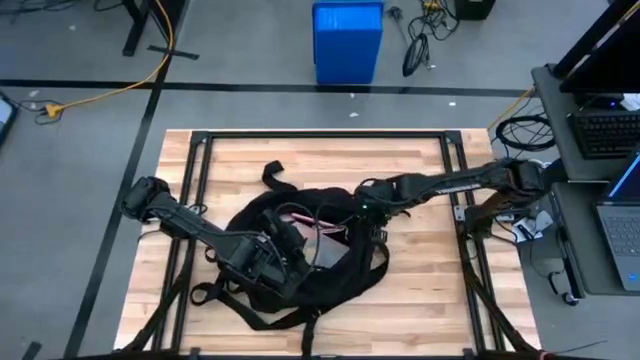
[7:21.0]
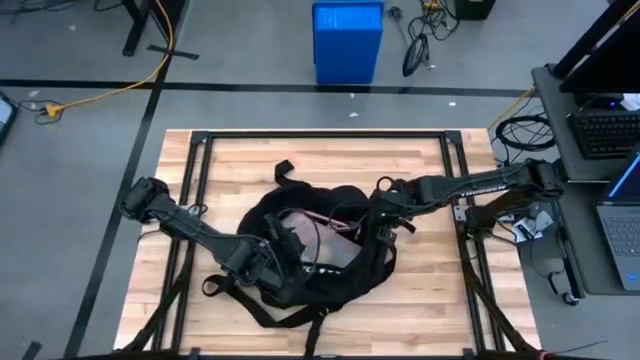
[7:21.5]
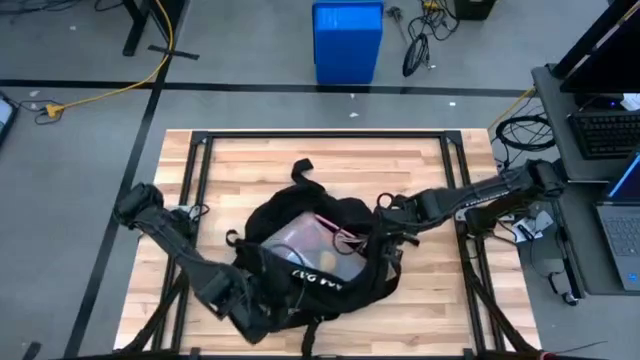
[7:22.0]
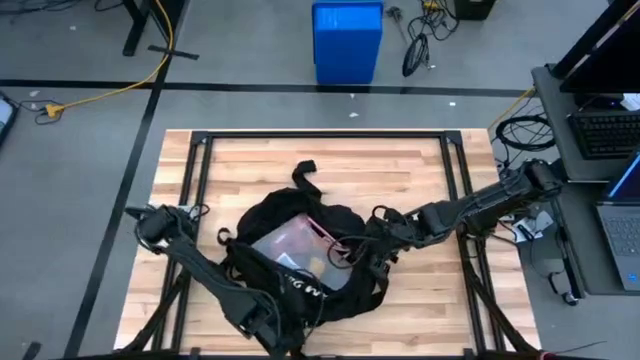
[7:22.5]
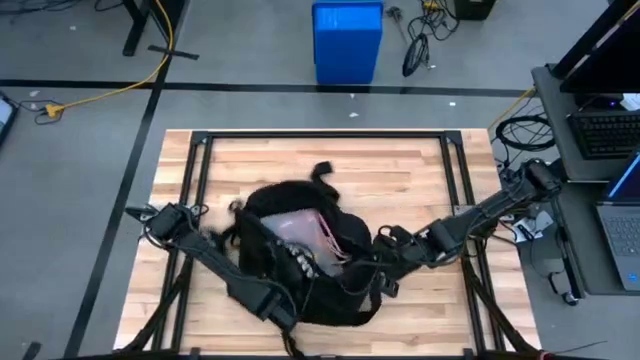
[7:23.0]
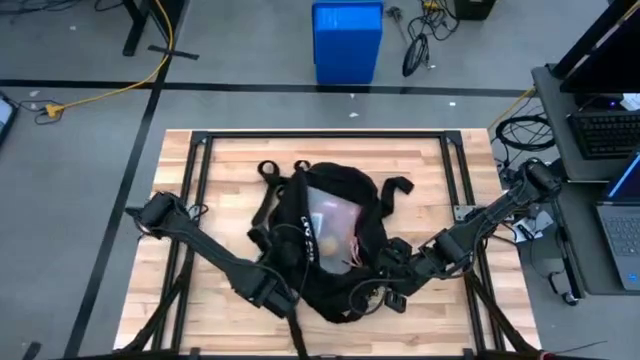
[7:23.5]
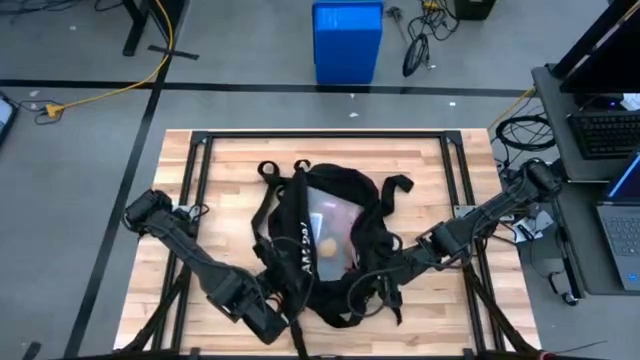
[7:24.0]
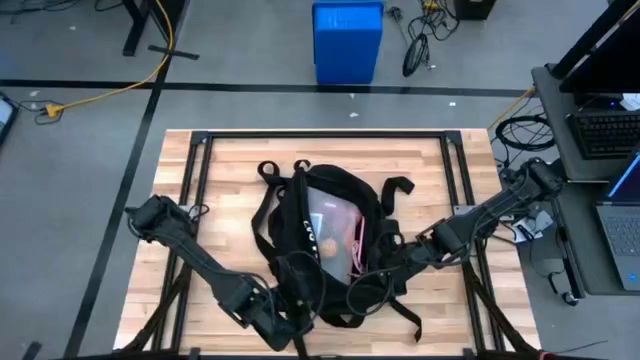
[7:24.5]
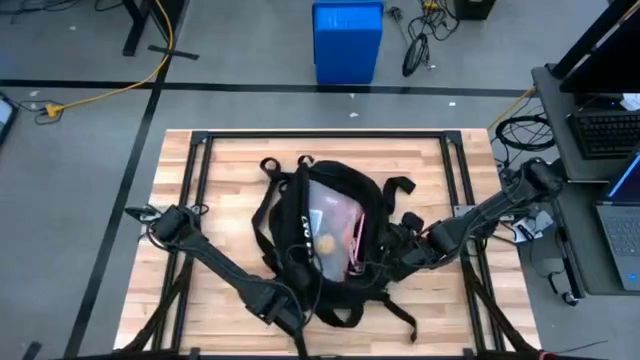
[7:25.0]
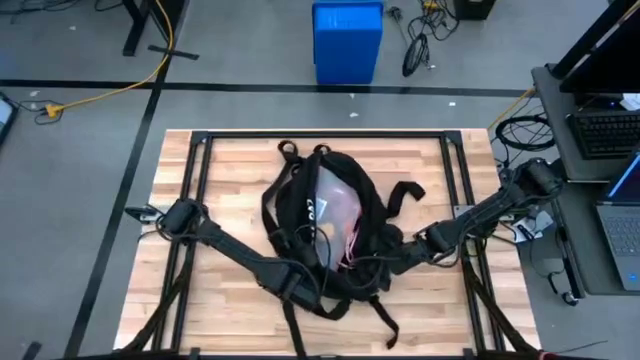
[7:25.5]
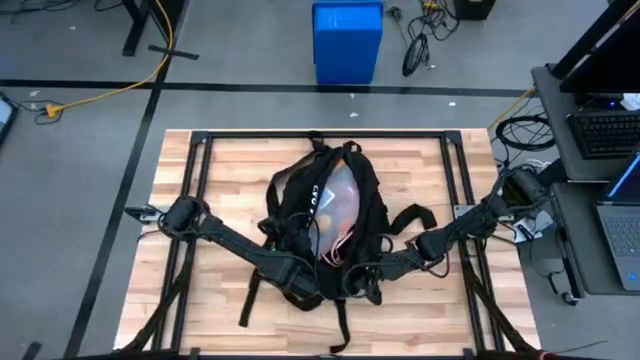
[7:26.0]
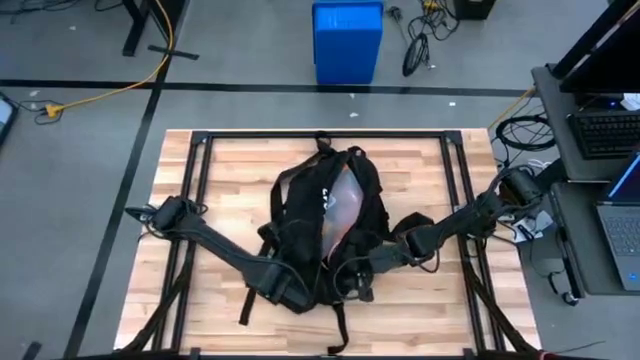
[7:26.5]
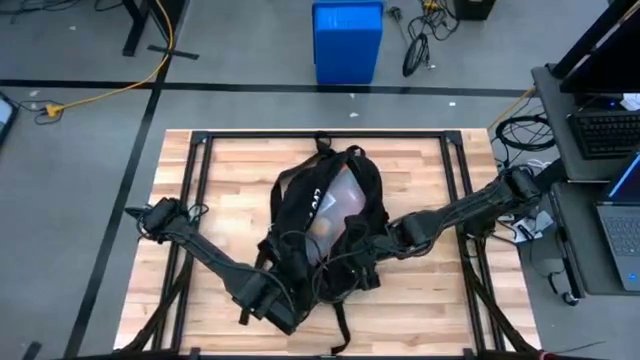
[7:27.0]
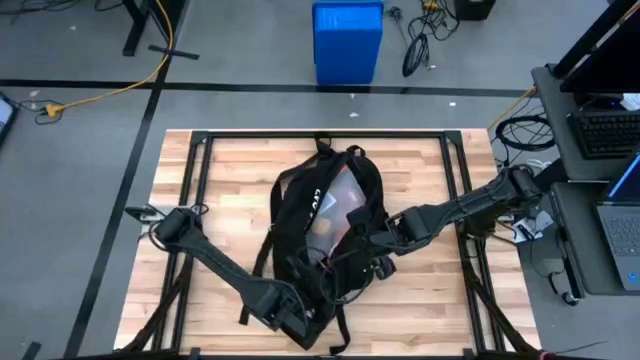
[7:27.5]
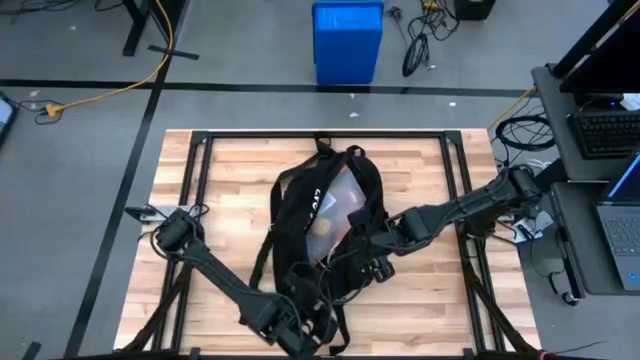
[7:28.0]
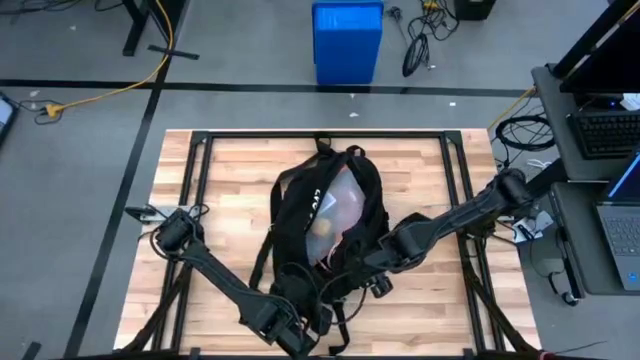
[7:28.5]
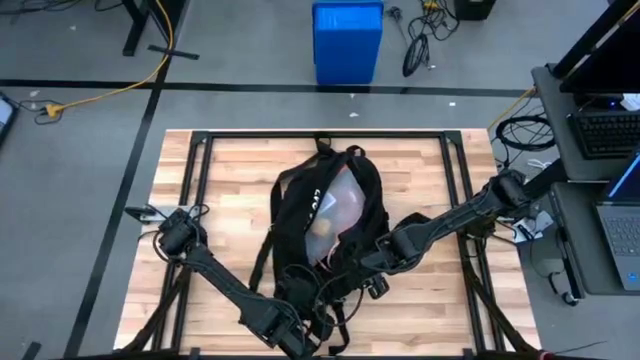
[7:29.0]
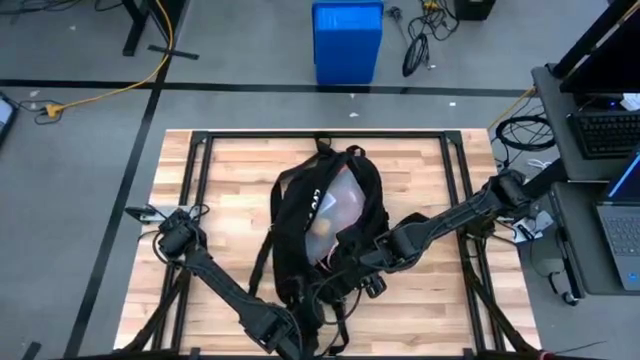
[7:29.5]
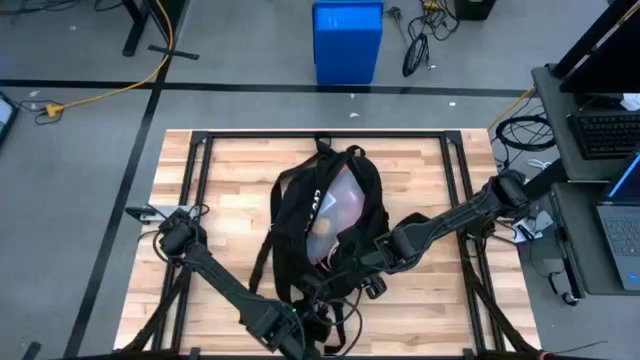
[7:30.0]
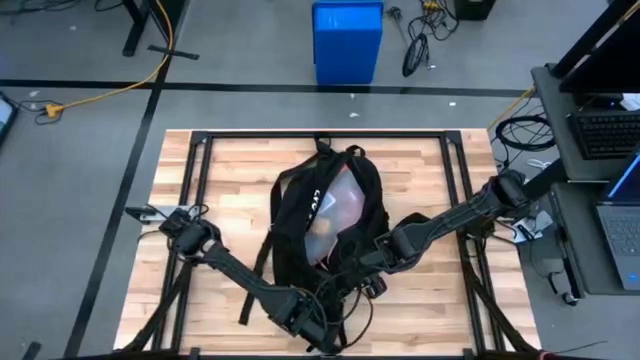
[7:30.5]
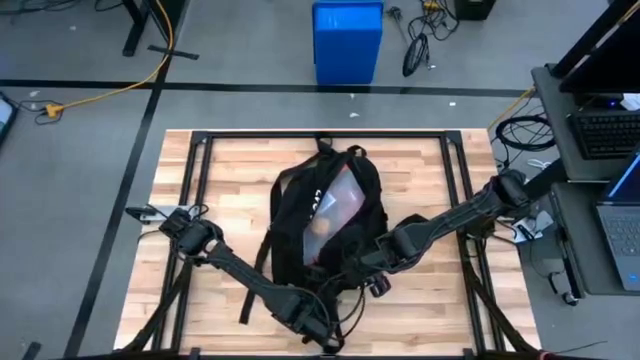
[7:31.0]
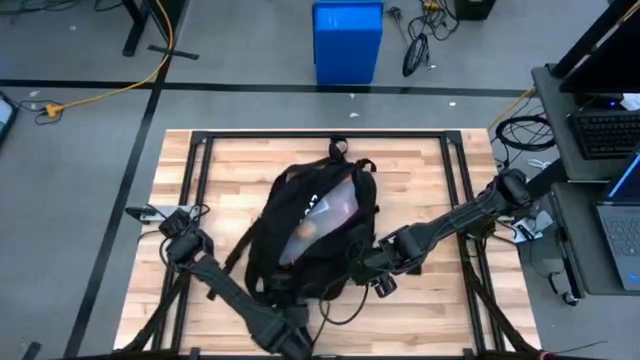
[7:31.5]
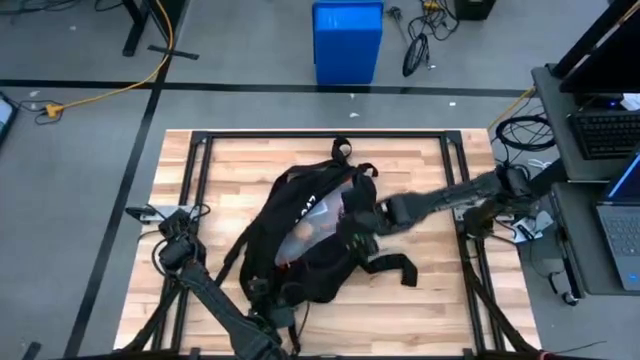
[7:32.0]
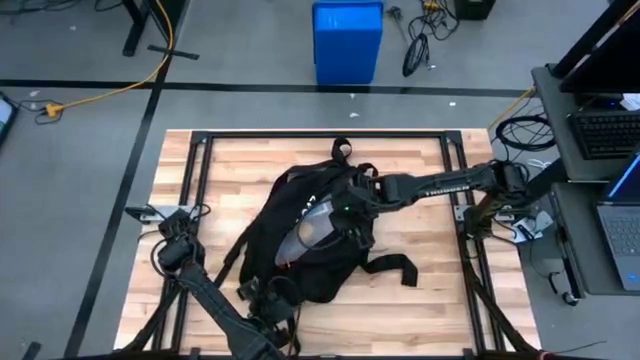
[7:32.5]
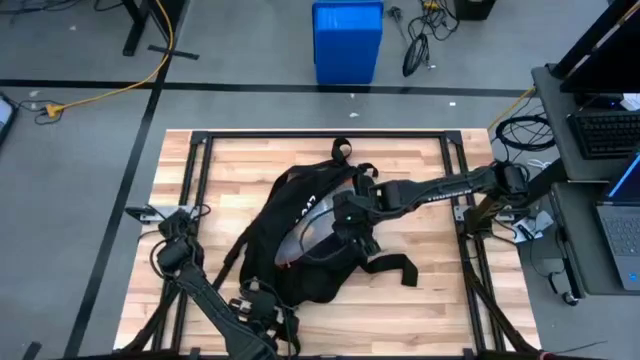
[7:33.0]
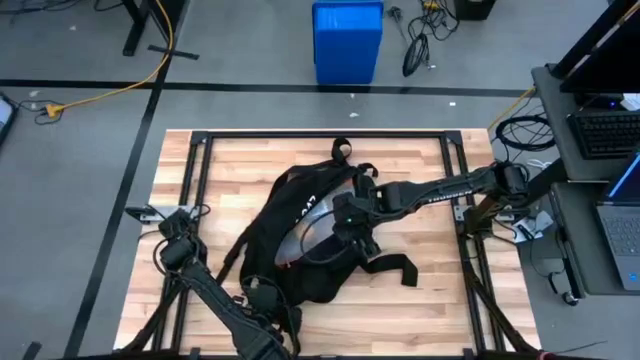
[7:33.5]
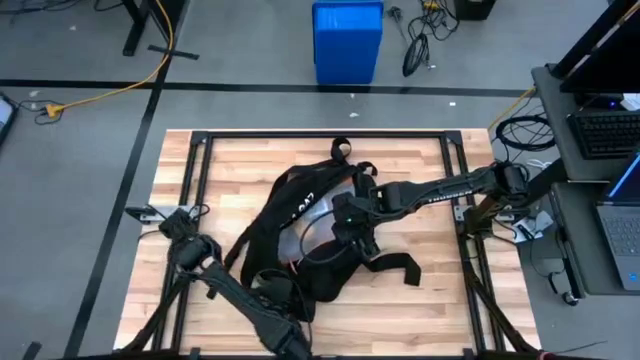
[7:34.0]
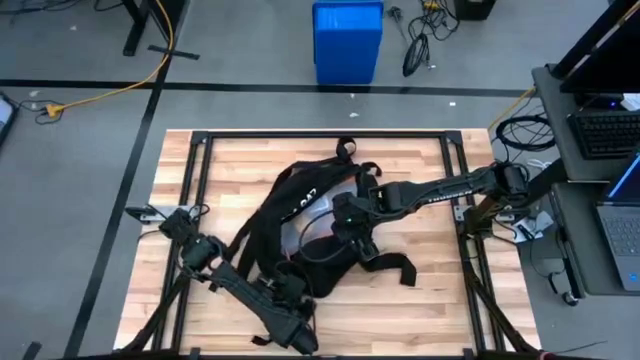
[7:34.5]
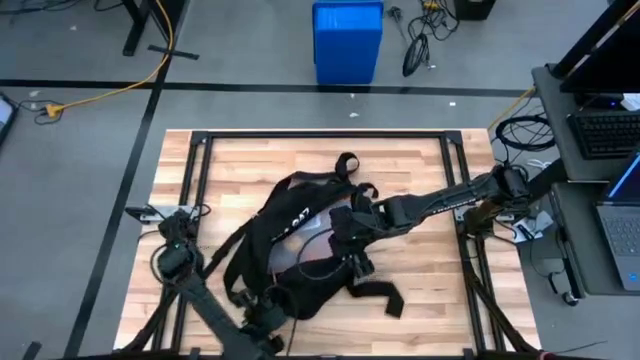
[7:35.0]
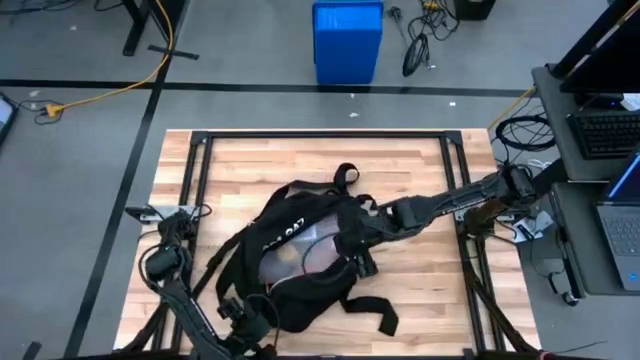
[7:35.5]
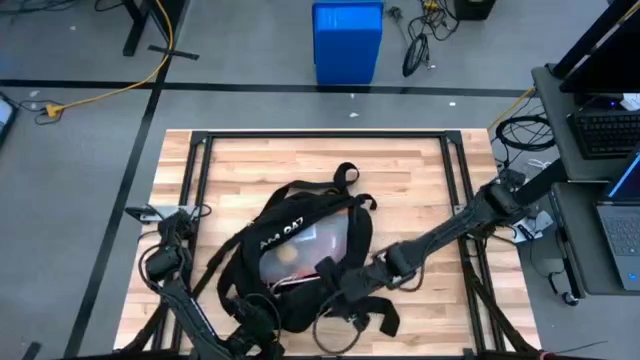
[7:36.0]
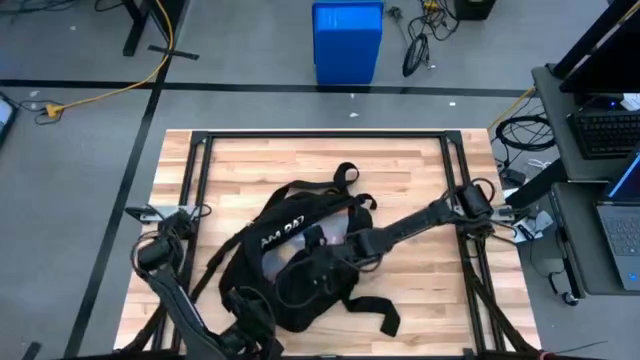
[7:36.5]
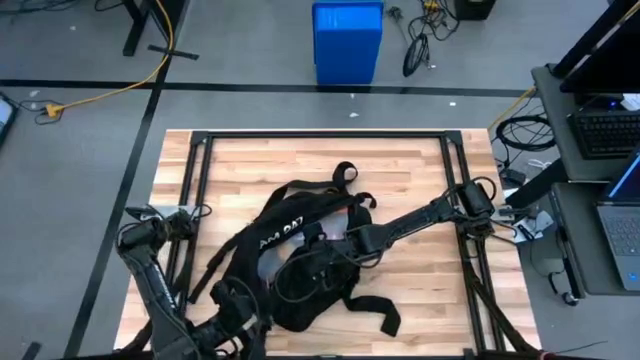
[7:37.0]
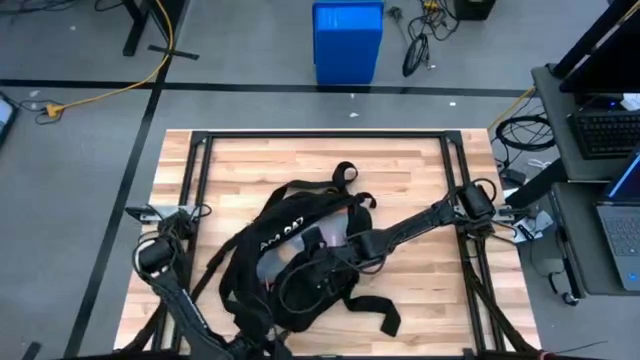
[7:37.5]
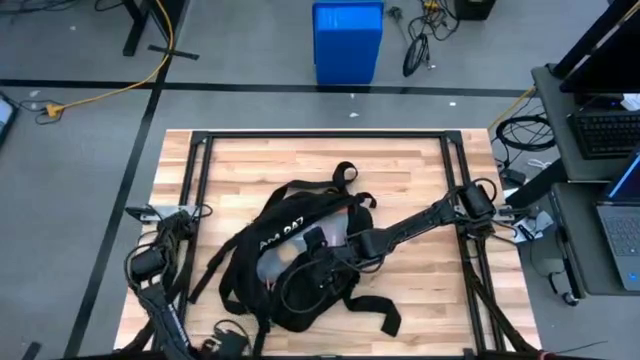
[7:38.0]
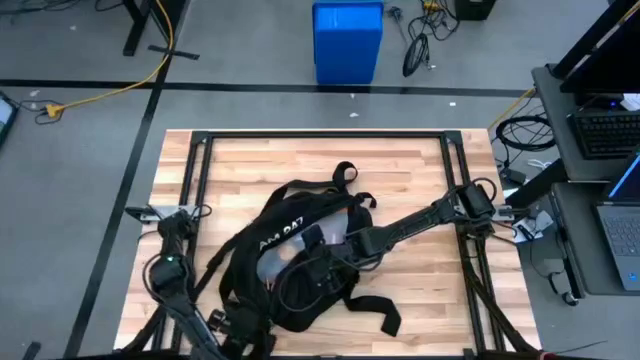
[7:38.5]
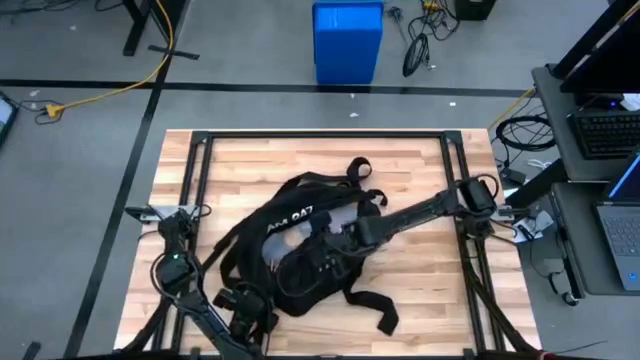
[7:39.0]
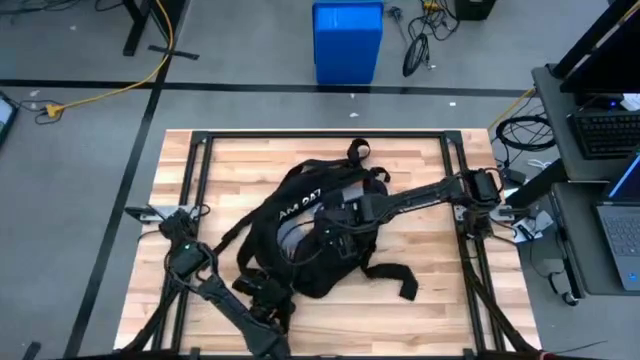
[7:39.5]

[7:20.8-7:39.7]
Task: Unpack backpack
Close the black backpack

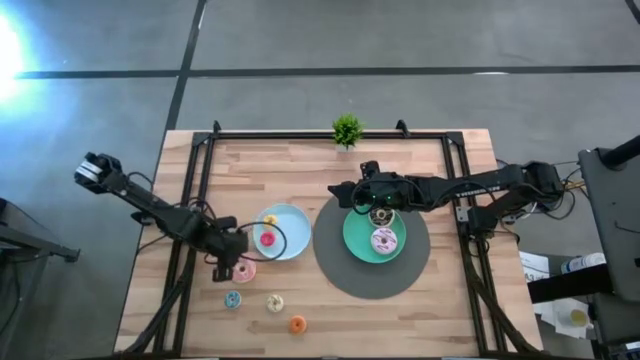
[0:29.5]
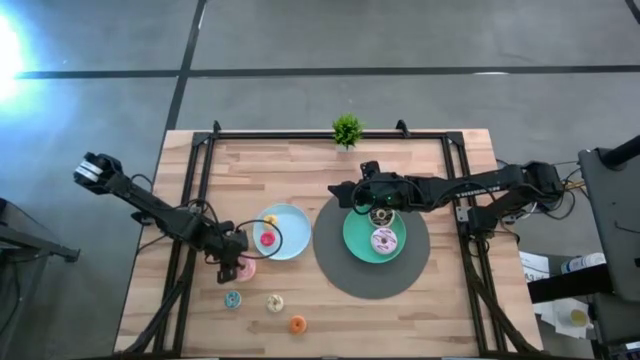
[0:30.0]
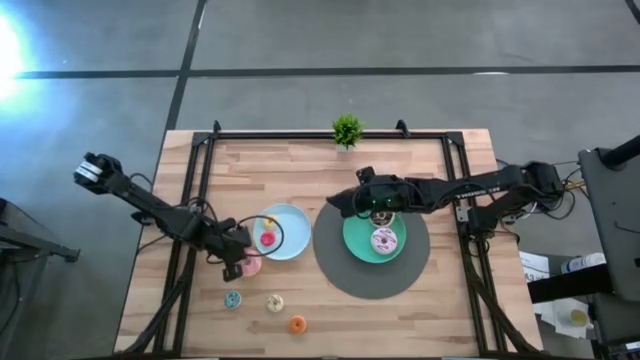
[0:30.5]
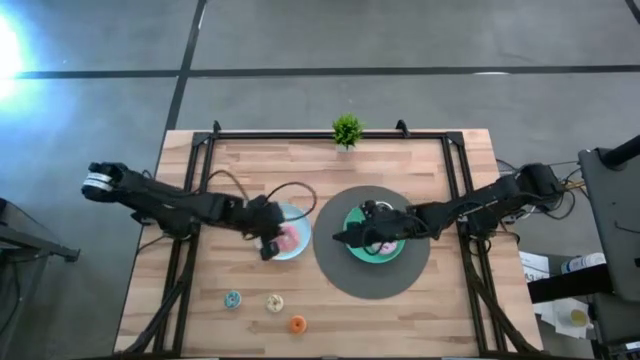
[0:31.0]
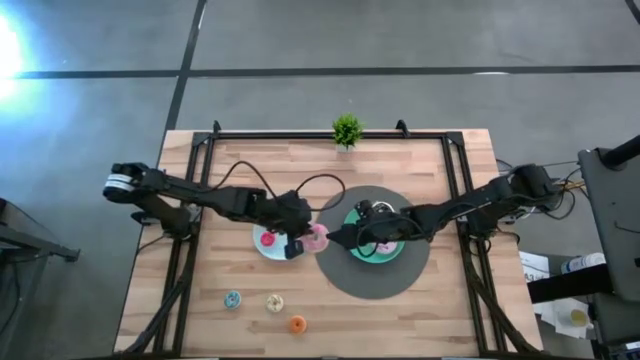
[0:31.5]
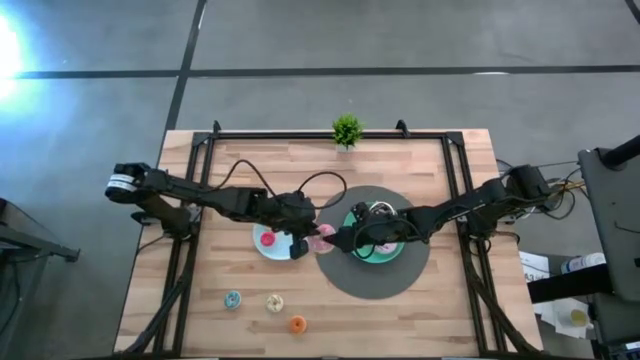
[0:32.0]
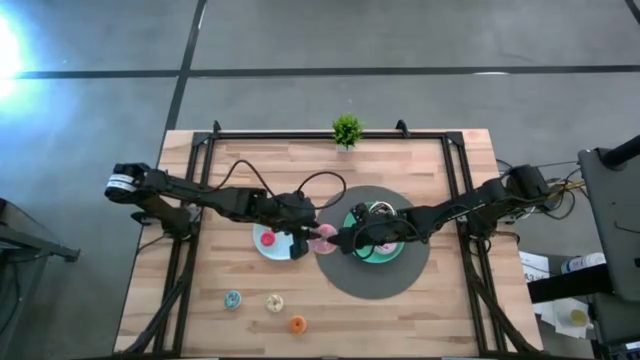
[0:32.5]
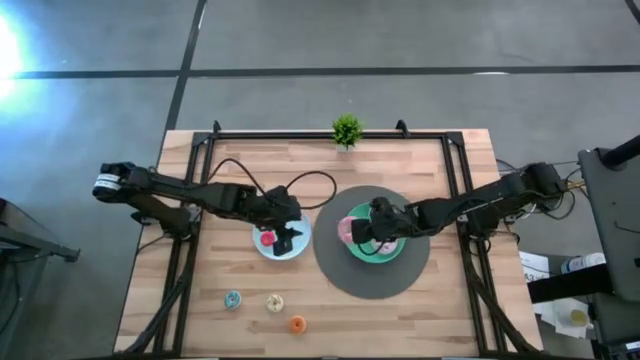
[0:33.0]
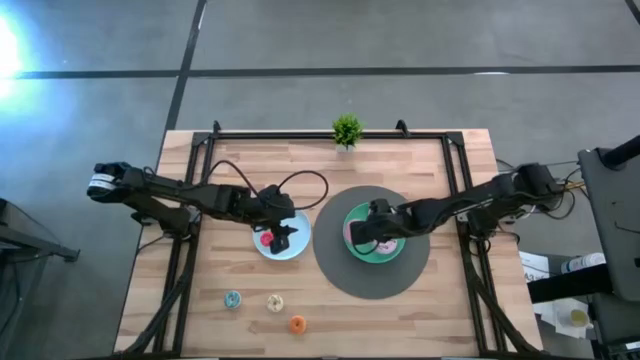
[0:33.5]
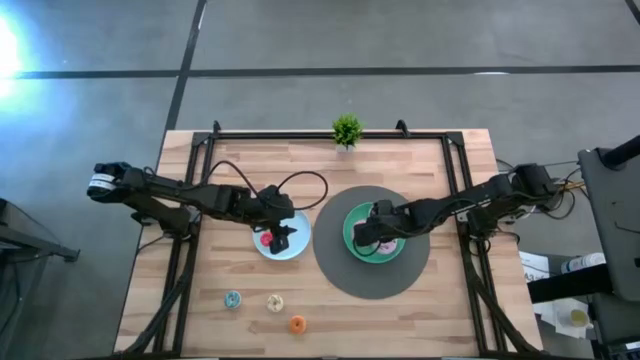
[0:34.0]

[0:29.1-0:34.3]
Task: Pick & Place donuts
Put the big pink donut on the green plate
